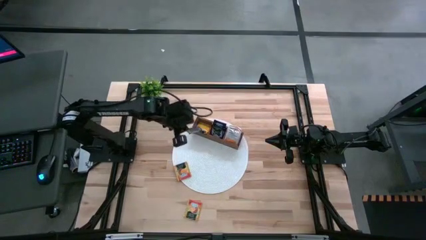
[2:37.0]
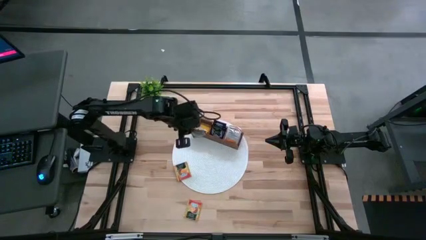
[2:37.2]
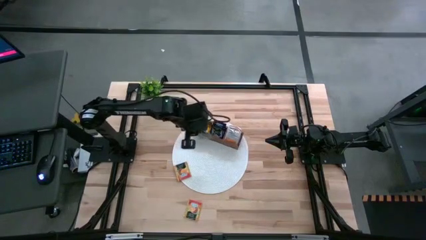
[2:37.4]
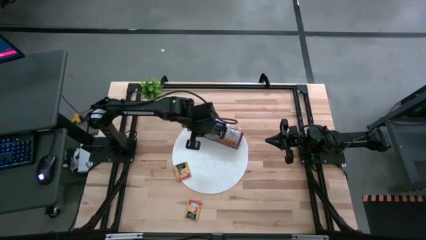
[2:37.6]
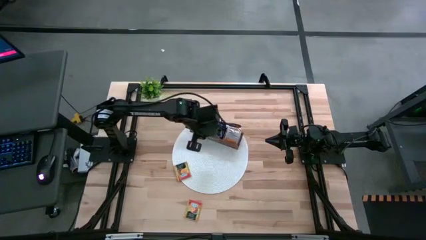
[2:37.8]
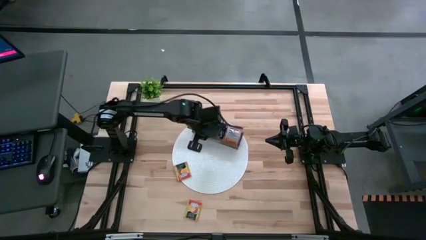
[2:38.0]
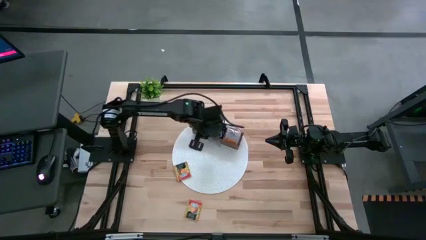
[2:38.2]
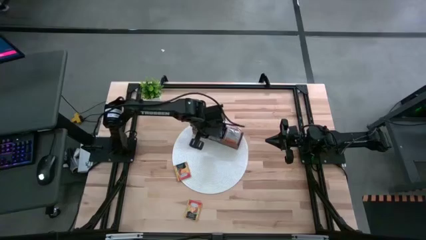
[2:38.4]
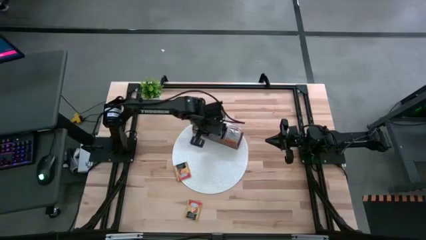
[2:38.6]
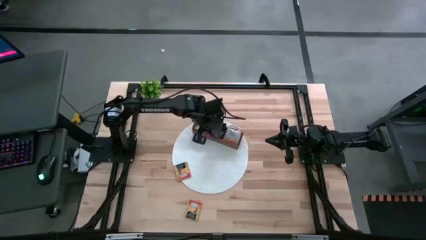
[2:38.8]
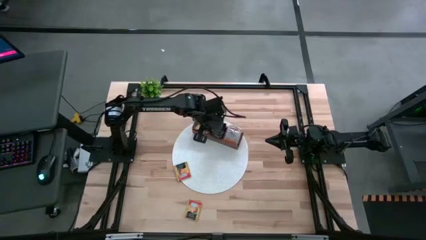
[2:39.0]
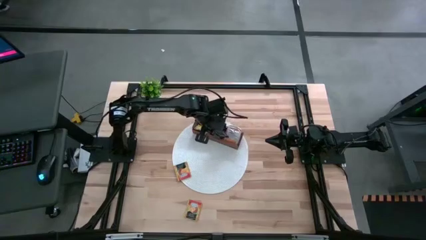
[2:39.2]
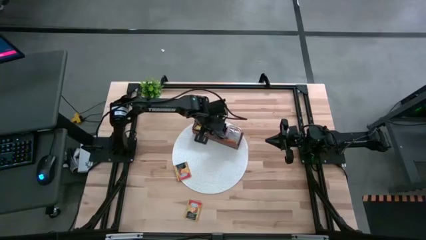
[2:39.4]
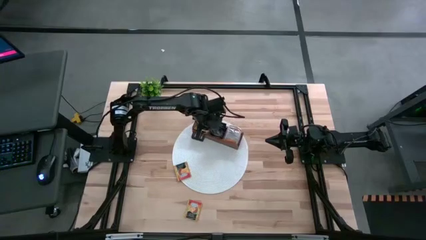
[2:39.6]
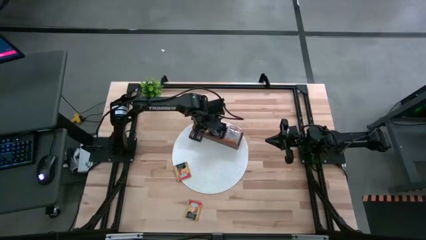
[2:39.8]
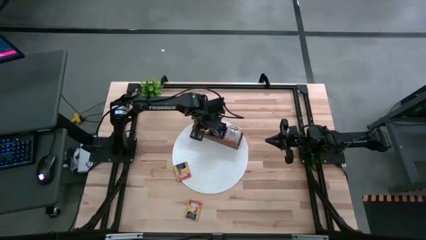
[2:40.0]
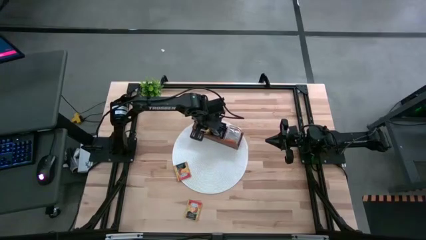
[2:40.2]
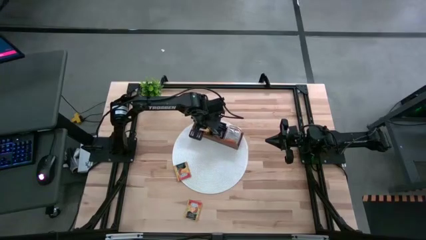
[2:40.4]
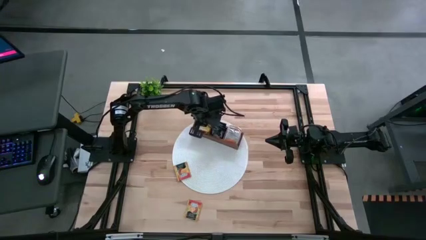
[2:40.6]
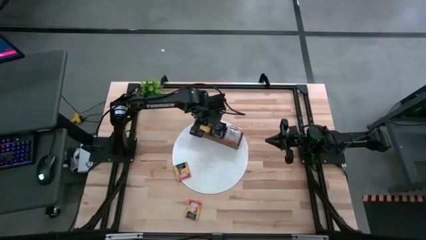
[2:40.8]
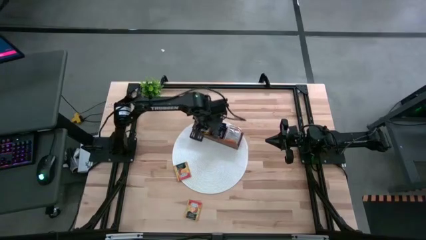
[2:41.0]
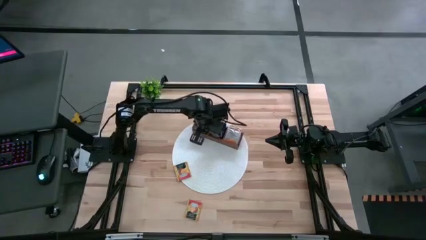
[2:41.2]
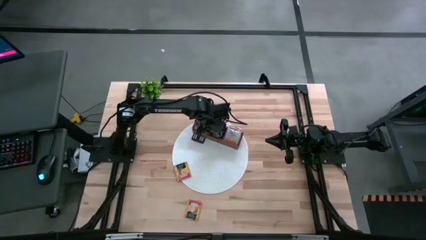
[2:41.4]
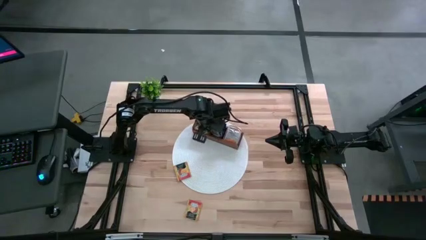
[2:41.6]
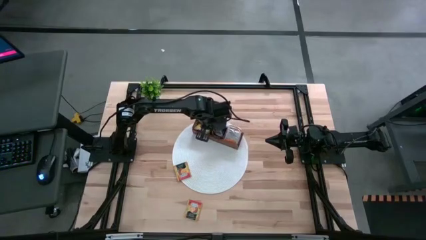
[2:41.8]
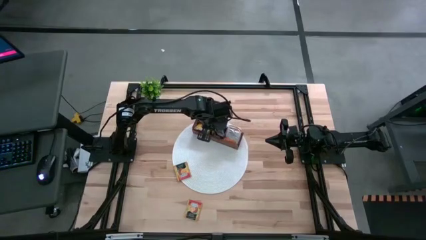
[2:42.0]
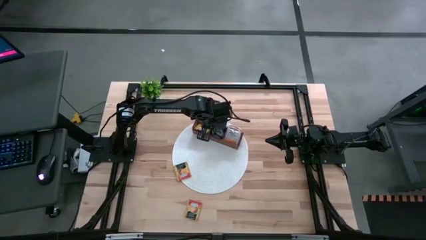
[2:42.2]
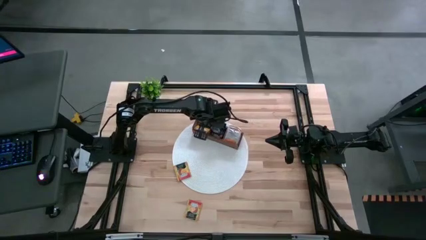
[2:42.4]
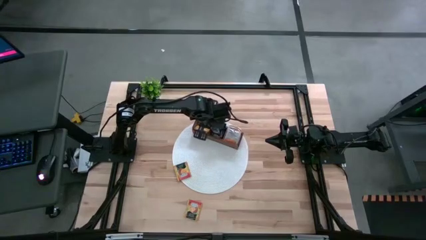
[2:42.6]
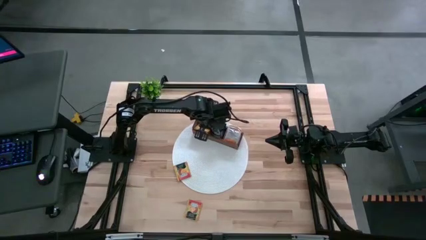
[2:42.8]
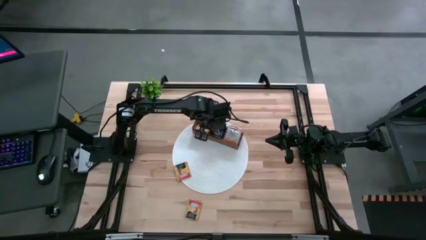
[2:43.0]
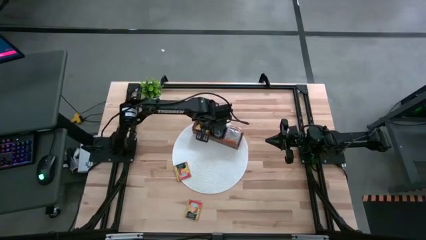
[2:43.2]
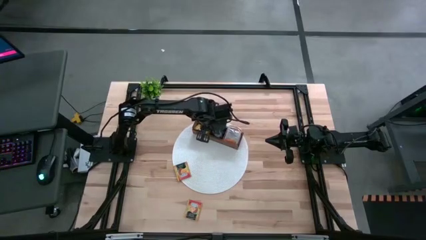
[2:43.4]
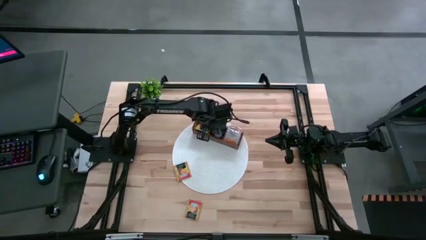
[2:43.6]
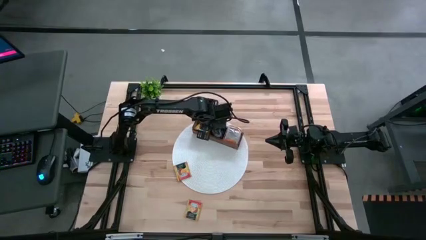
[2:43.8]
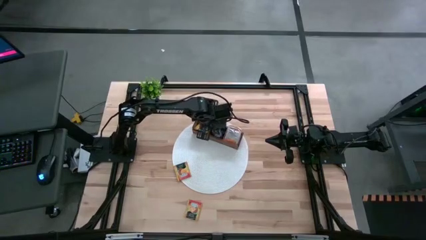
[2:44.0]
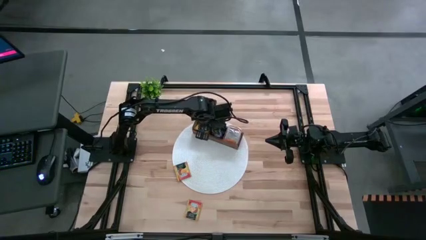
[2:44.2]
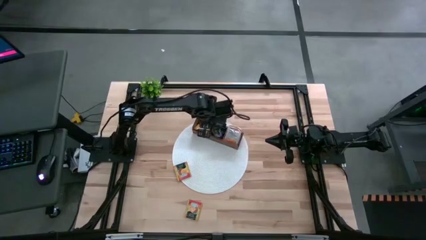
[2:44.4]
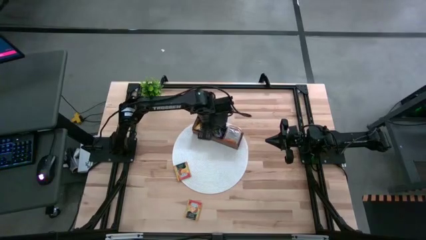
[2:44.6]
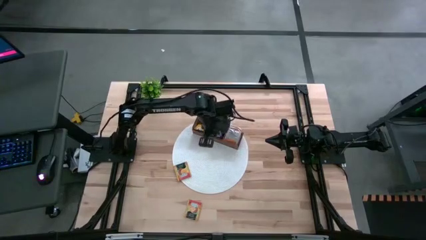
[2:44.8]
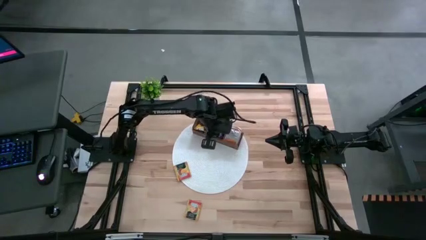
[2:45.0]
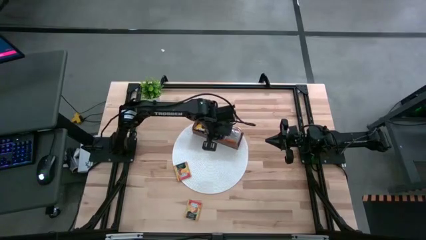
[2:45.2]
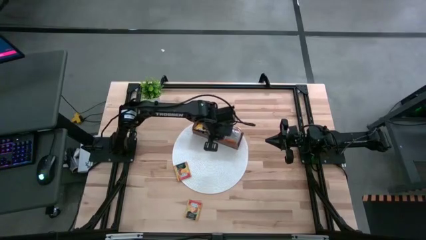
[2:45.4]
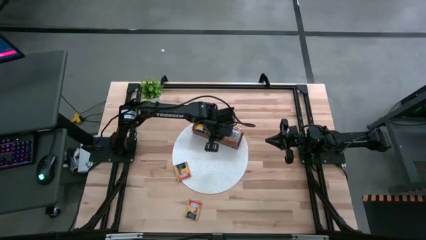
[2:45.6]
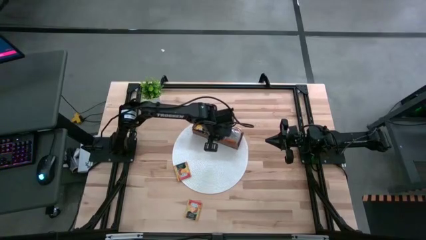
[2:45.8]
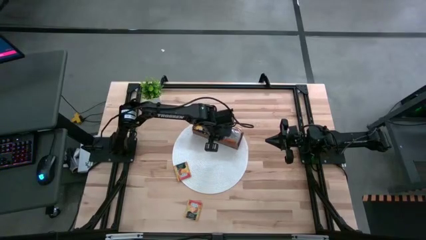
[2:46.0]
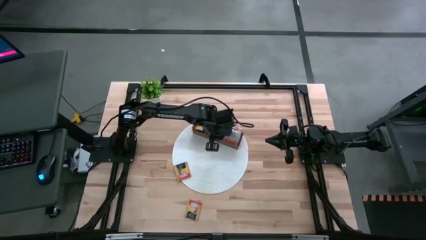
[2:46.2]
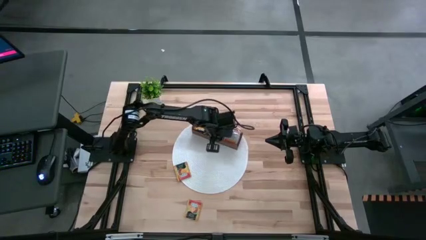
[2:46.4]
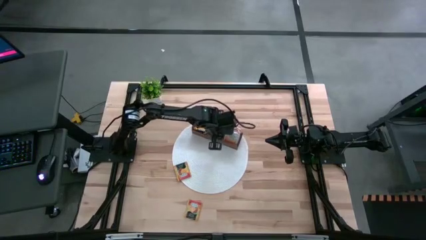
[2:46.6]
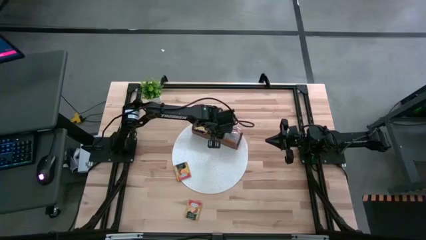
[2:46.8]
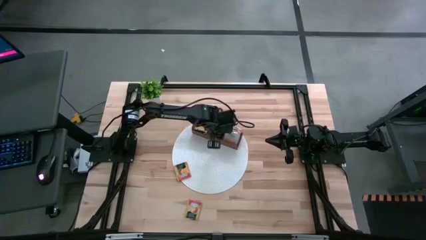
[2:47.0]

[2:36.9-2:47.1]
Task: Pick & Place Tea
Put the blue tea bag into the middle section of the wooden organizer

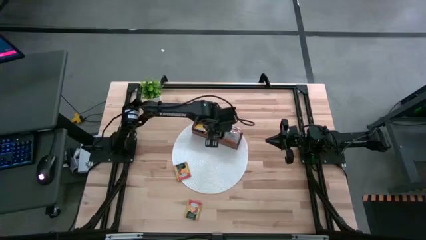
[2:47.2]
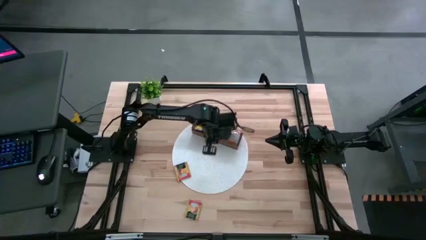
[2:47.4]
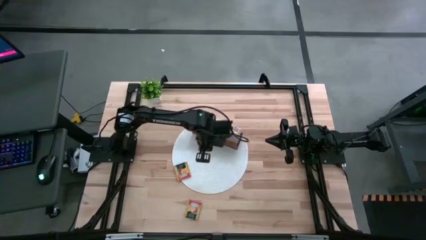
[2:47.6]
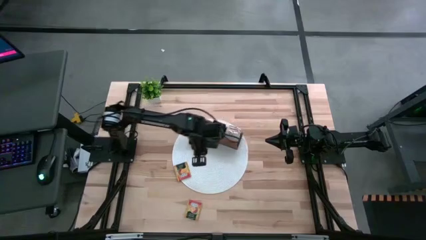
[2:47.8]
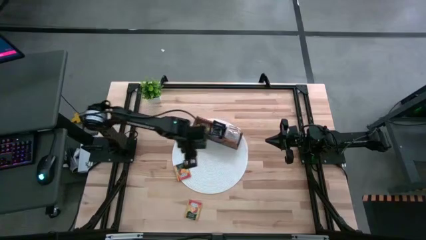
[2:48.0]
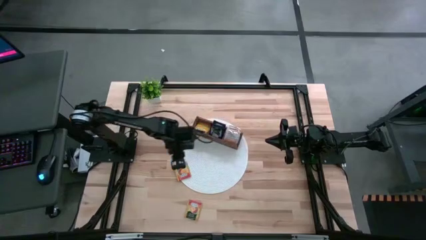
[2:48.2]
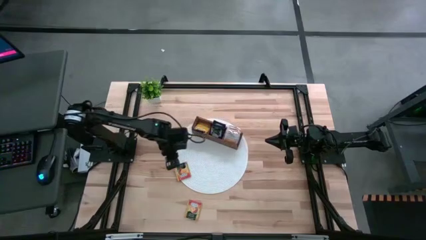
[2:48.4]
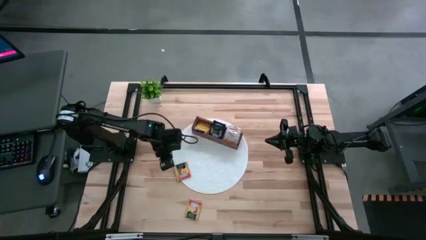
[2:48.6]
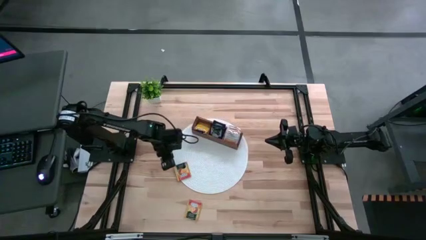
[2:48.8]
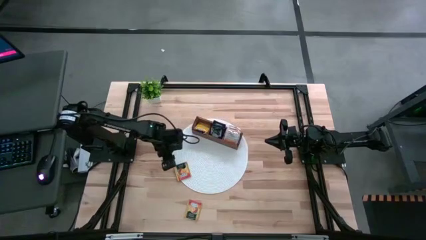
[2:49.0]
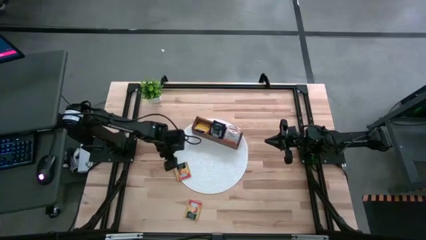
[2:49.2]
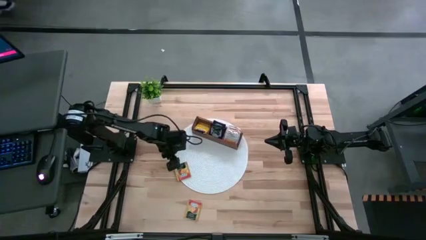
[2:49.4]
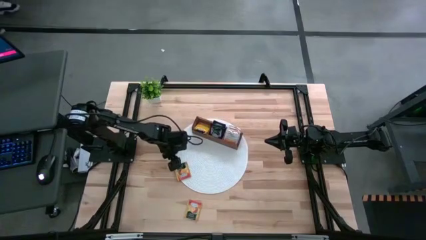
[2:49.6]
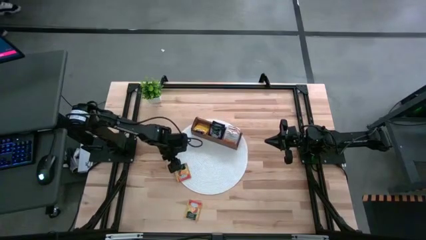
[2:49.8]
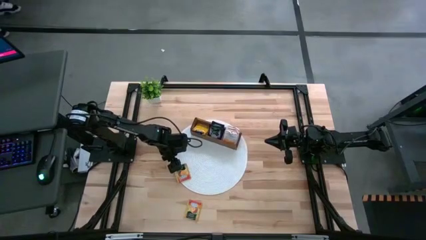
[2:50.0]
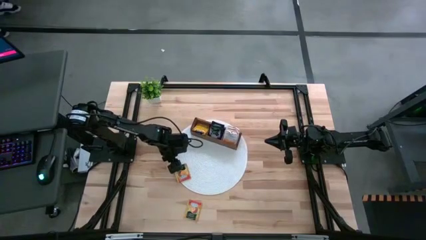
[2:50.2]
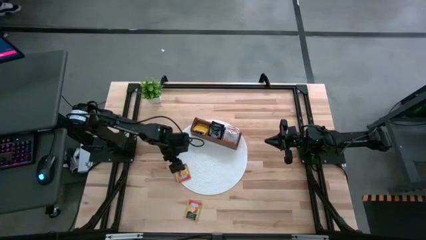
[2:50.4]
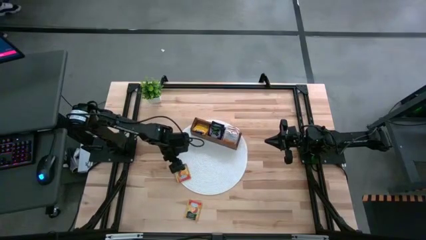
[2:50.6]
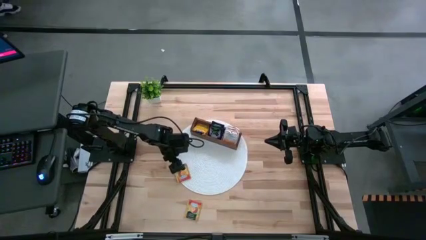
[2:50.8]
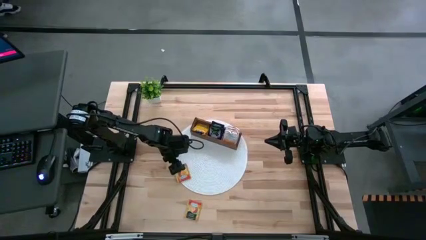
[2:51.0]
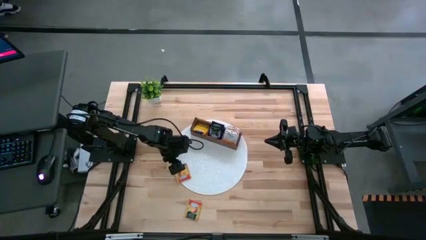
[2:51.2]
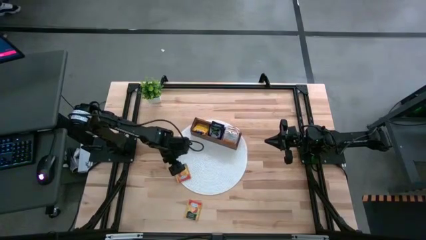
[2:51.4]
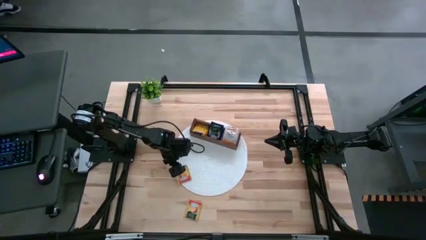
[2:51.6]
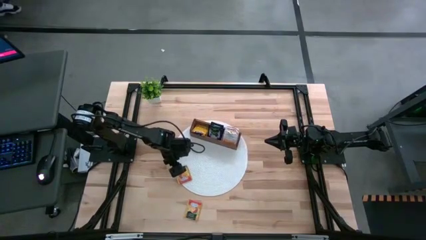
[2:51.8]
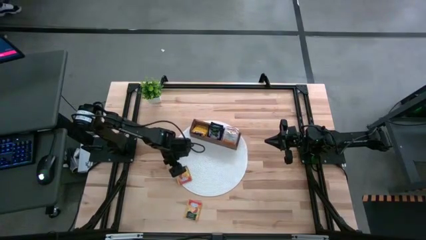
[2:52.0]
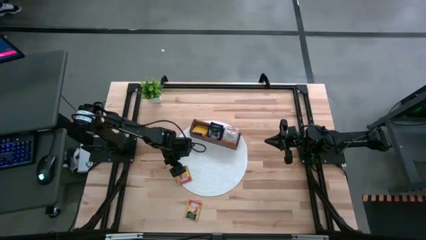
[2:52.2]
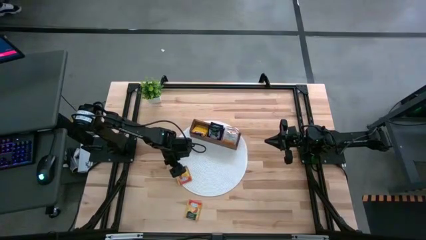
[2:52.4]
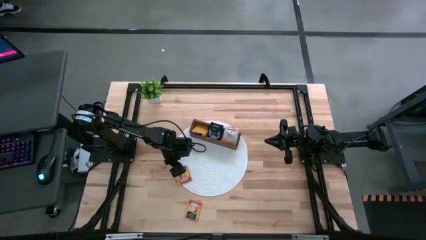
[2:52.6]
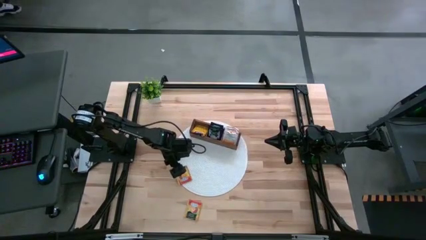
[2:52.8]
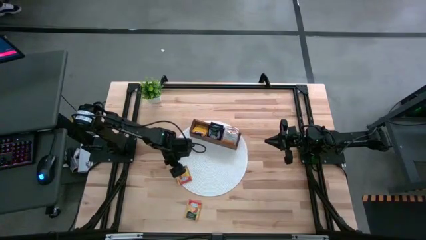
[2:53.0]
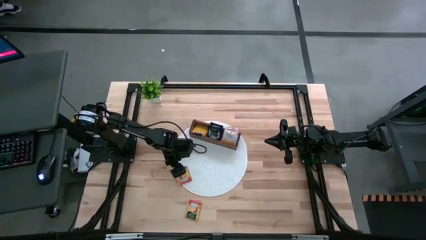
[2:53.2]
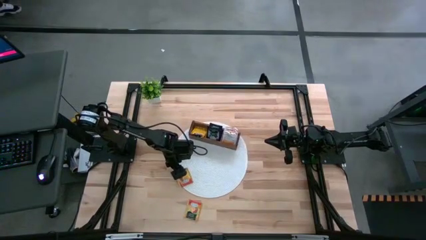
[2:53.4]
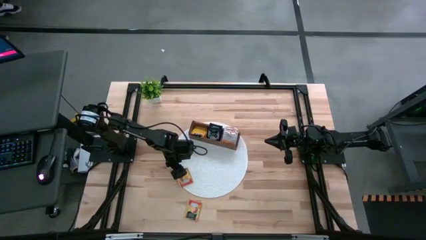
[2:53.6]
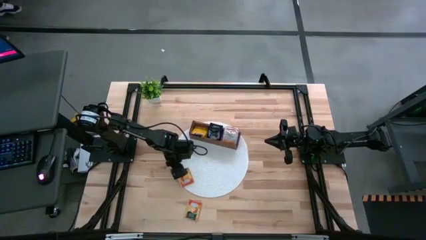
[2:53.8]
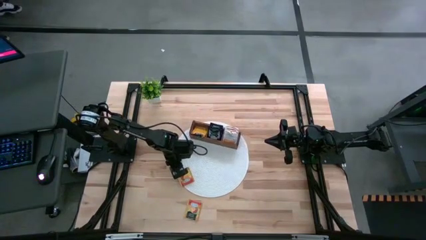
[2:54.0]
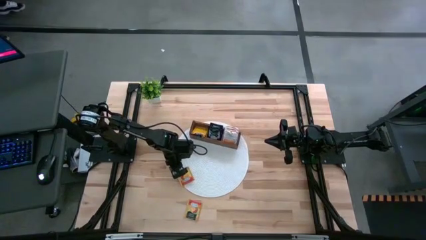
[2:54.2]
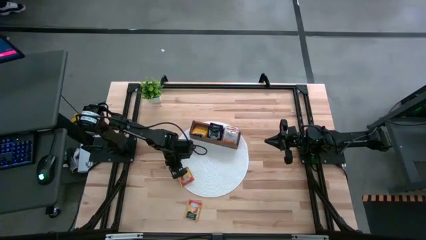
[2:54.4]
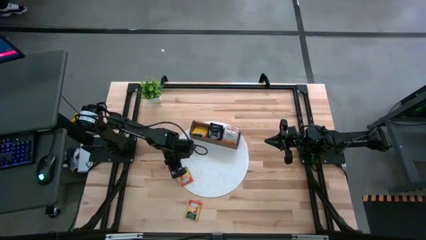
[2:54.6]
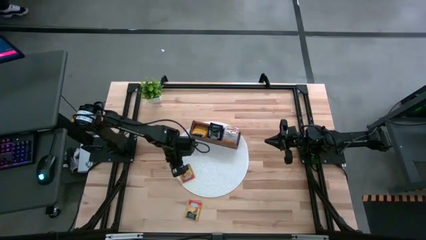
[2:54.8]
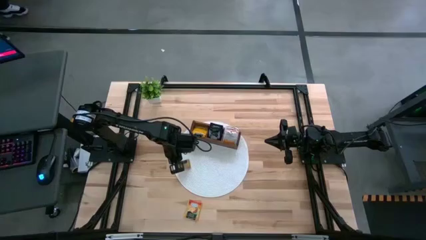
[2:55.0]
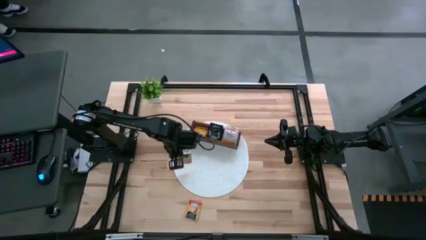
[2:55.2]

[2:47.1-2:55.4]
Put the orange tea bag into the left section of the wooden organizer
